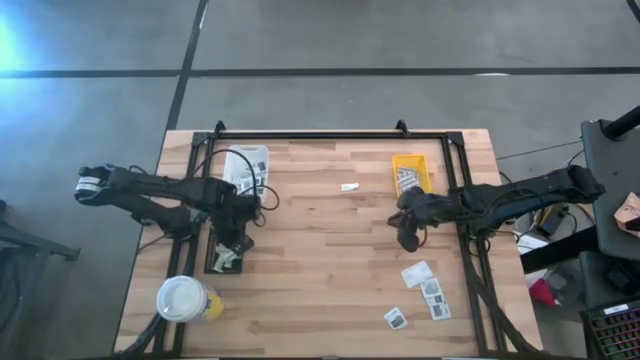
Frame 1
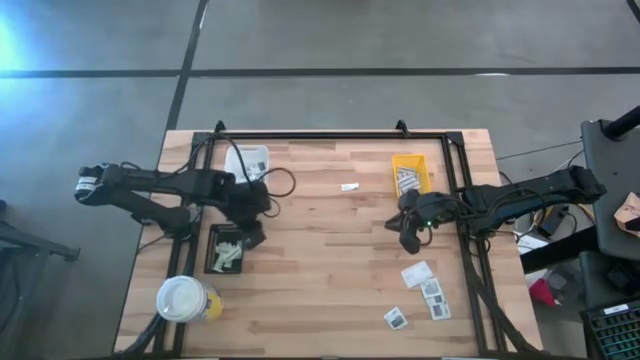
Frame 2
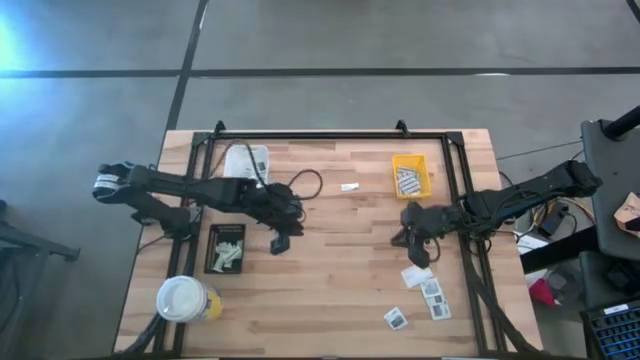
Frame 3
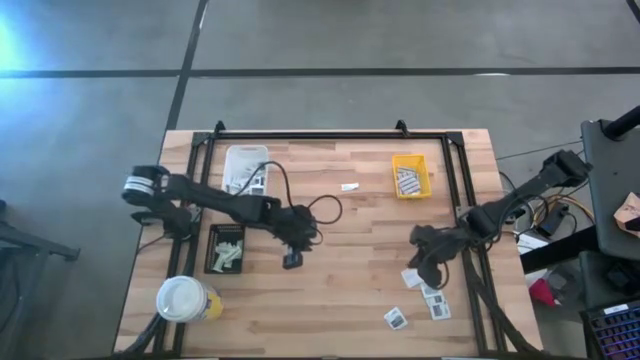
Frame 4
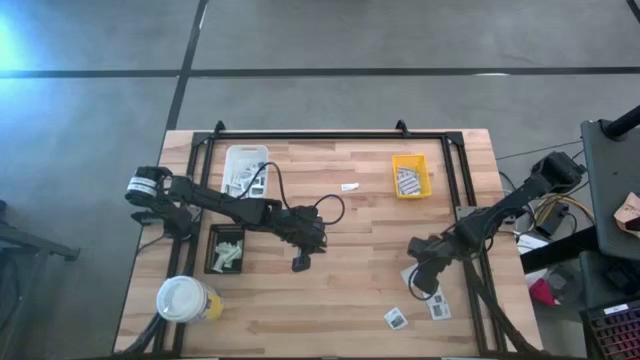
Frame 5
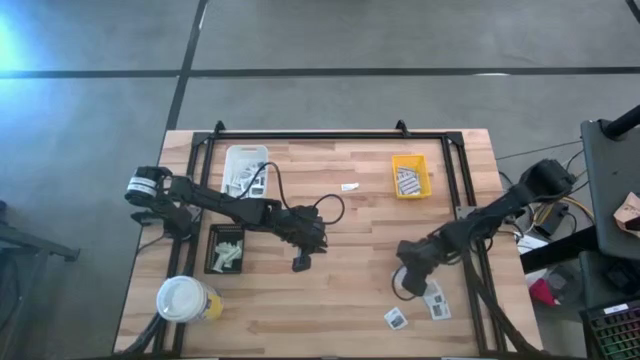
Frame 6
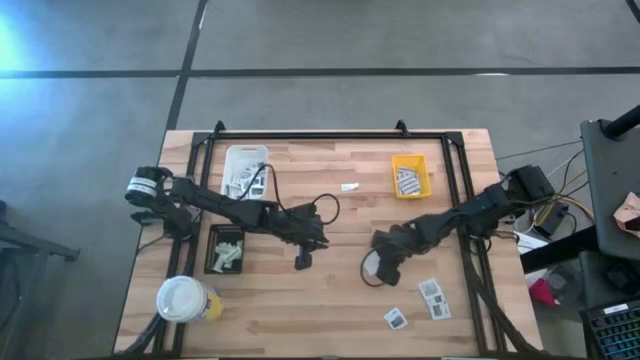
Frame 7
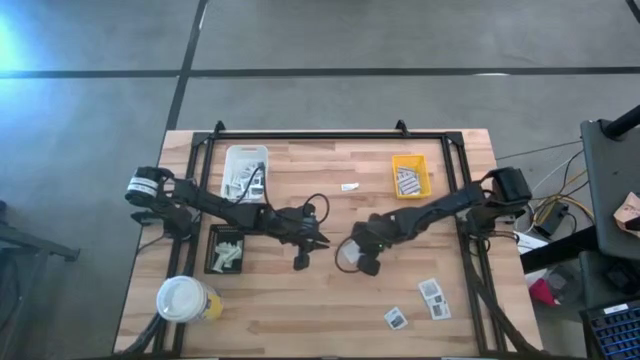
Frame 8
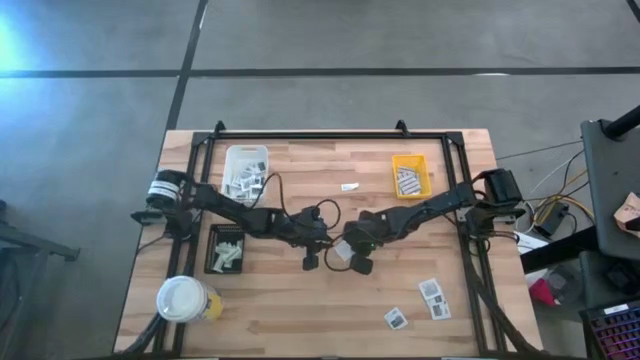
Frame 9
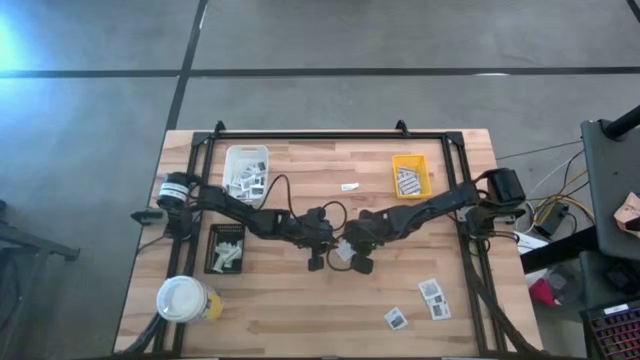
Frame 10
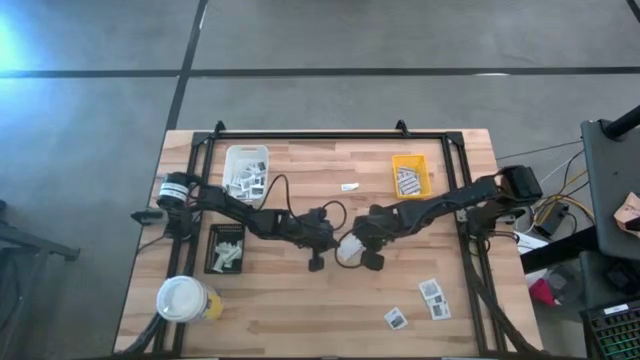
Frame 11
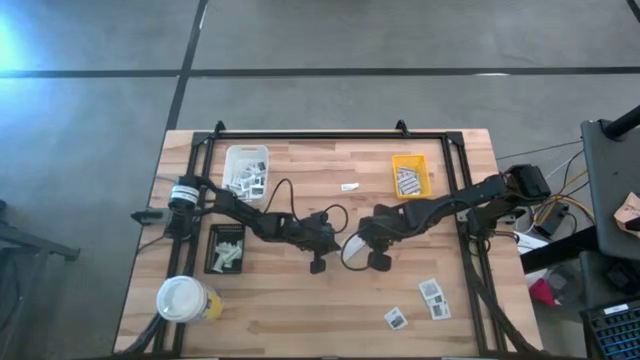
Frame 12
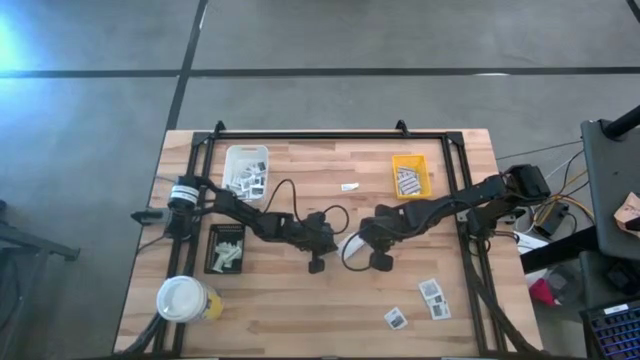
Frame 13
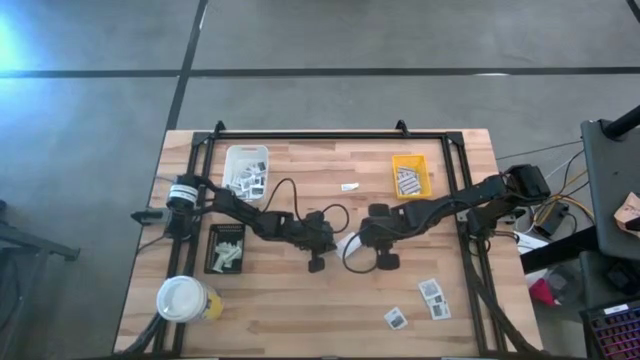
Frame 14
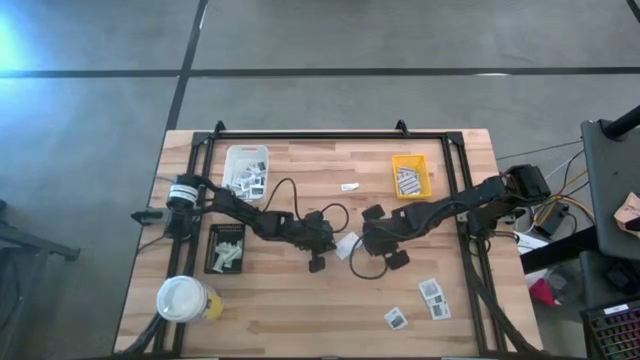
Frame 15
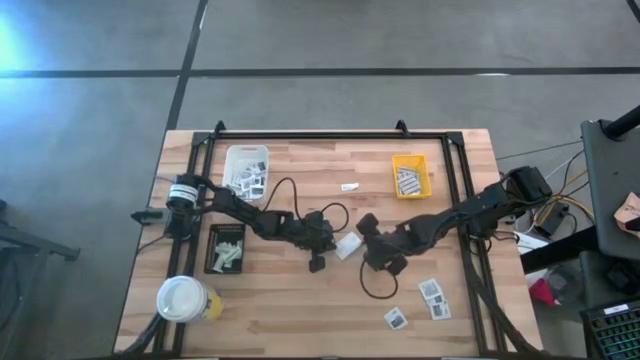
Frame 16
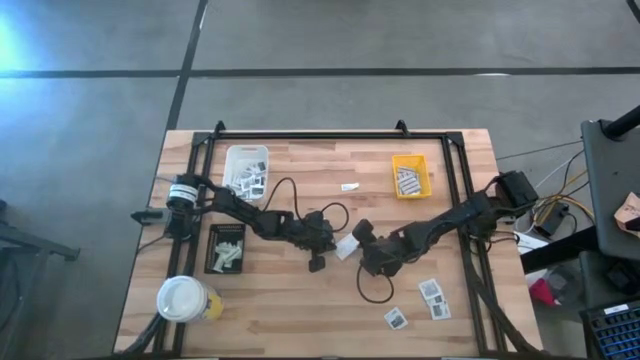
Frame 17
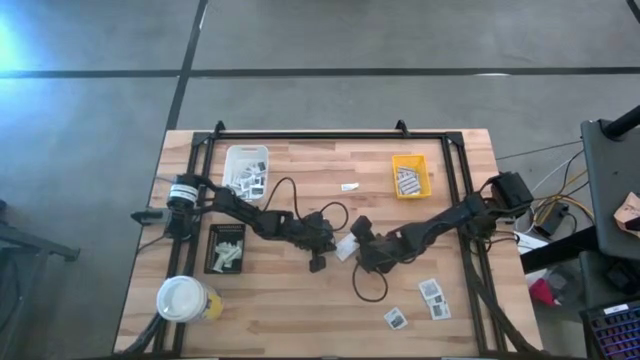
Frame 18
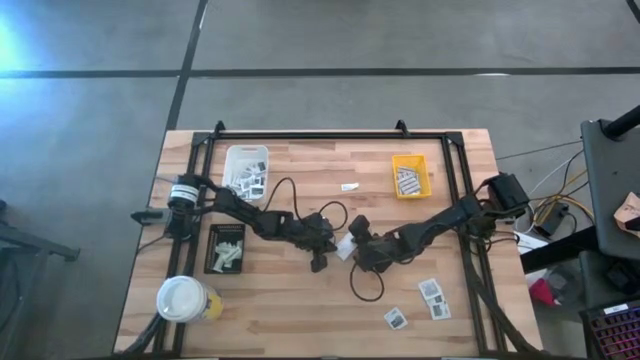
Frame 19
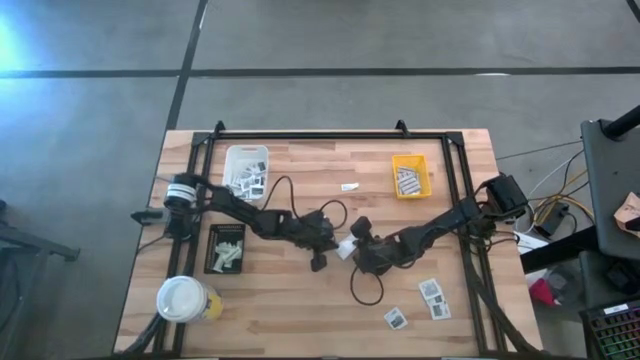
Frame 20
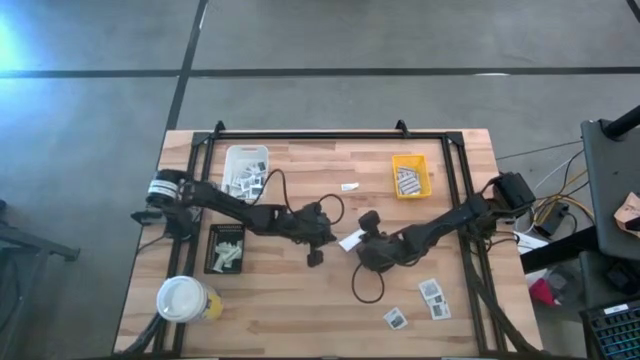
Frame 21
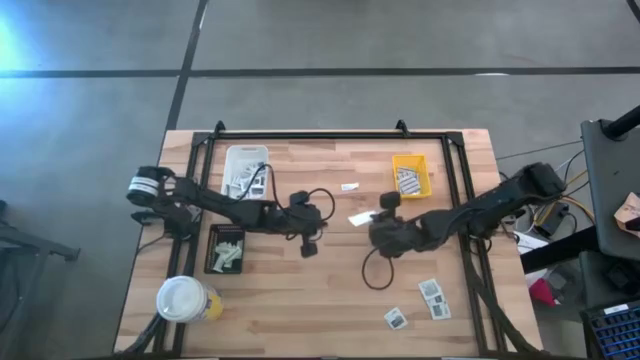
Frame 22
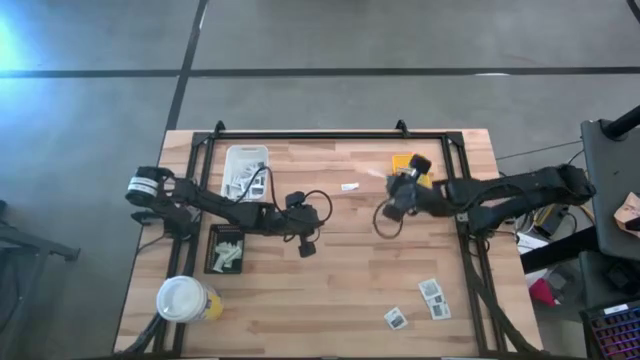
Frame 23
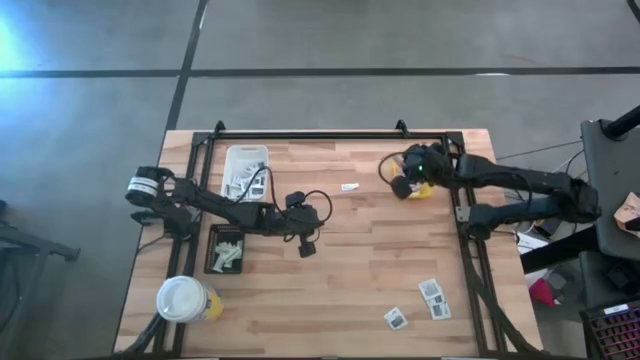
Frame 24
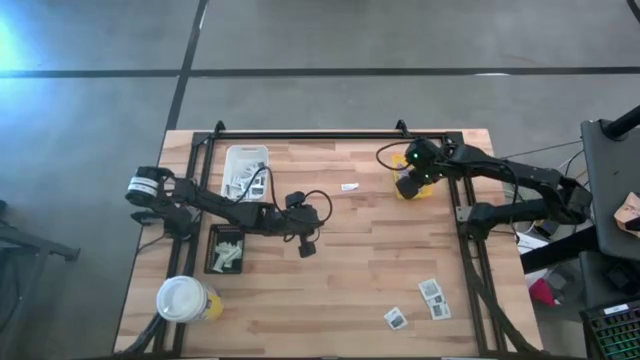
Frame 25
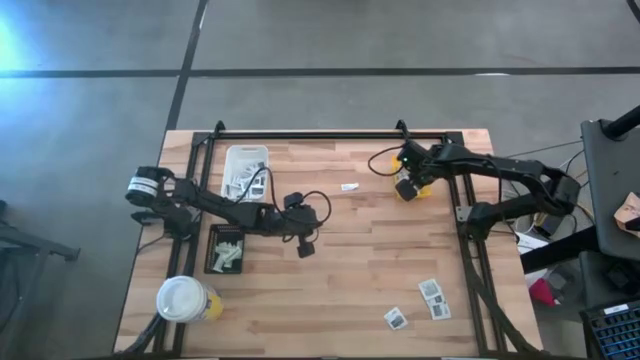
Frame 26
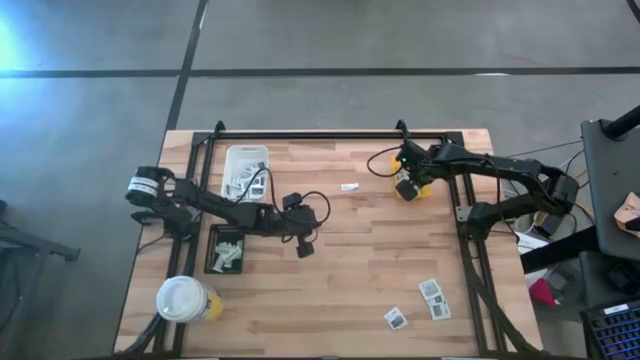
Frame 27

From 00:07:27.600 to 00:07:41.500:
Task: Pick & Place First Aid Supplies
Put the blue bandage pack into the yellow bin

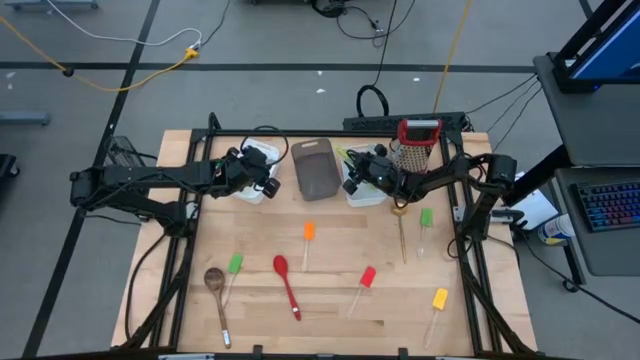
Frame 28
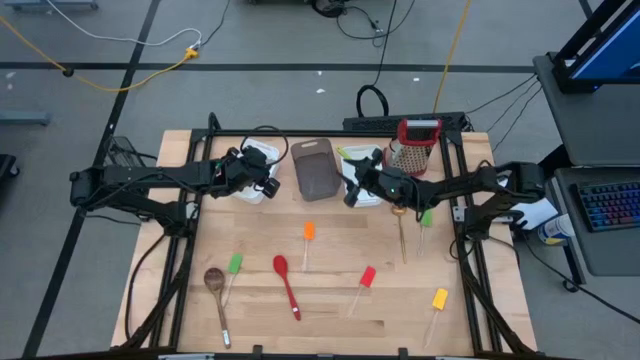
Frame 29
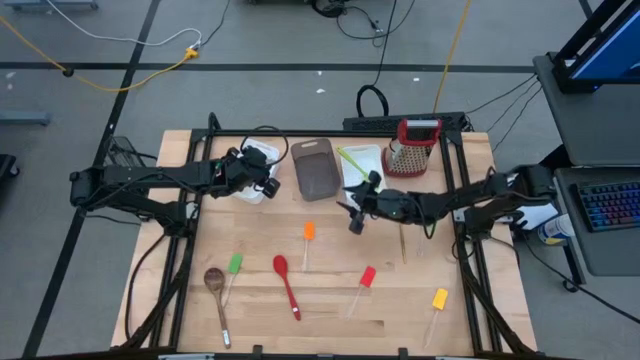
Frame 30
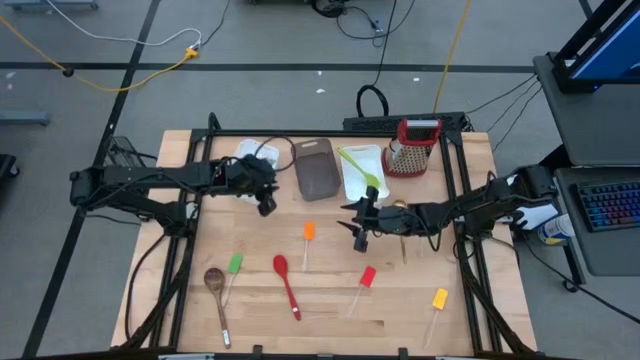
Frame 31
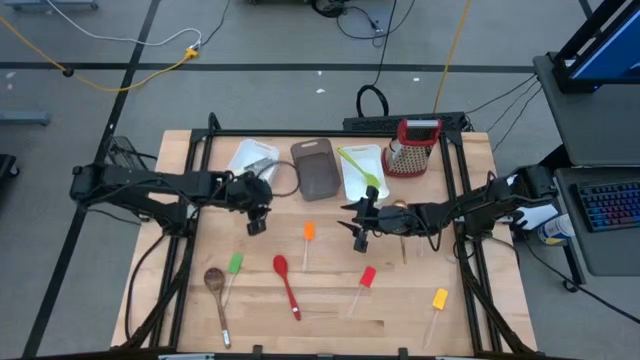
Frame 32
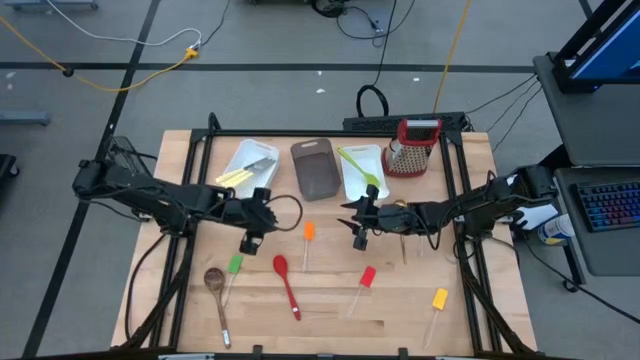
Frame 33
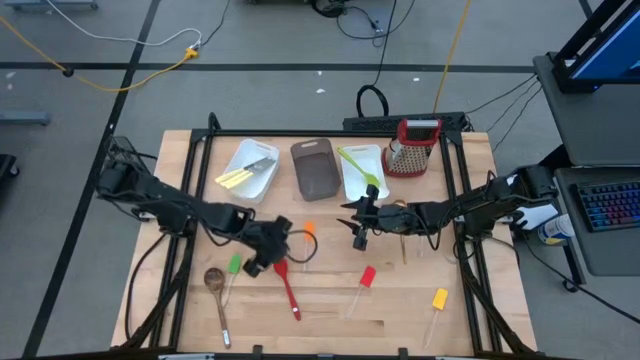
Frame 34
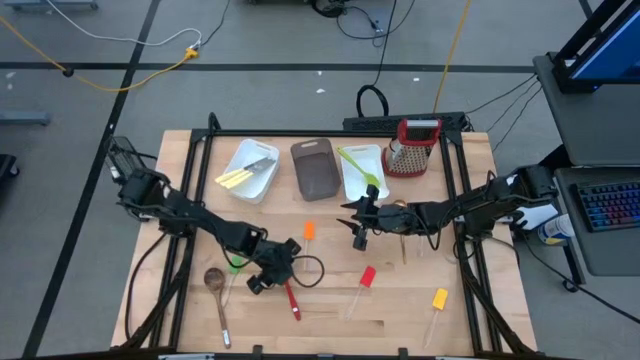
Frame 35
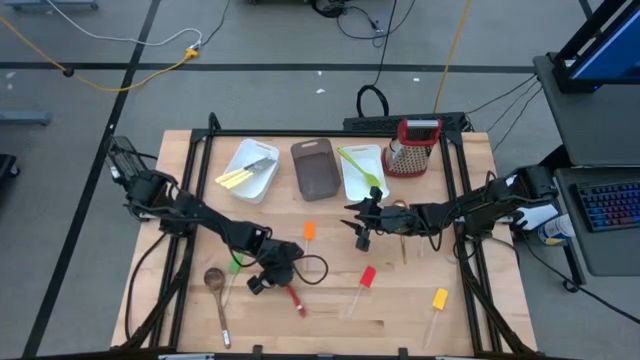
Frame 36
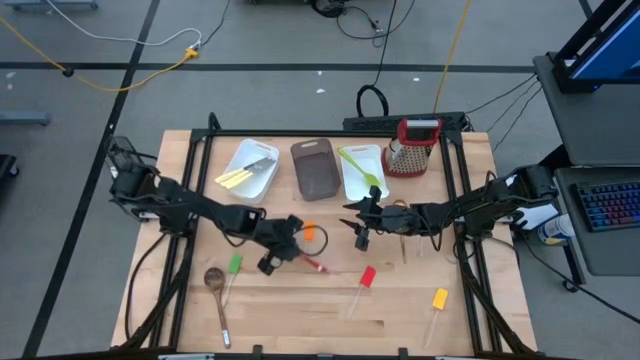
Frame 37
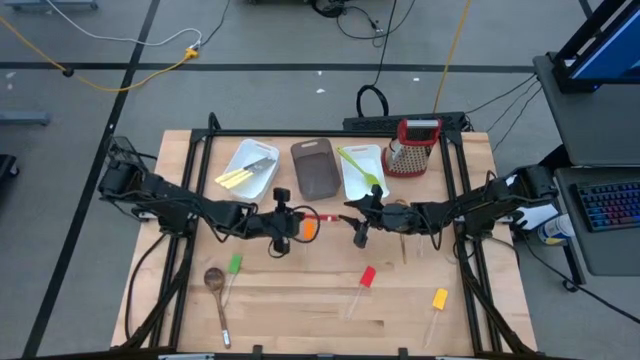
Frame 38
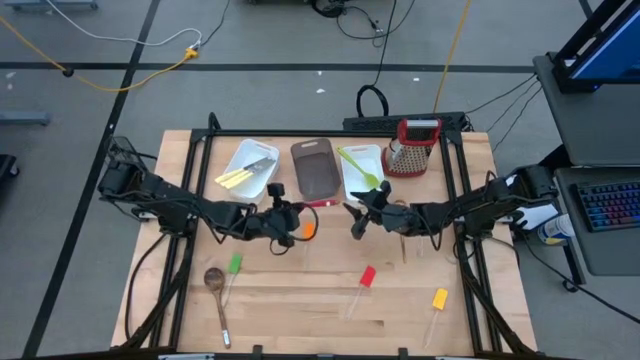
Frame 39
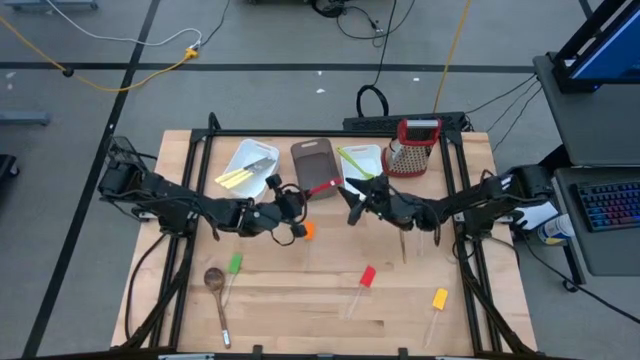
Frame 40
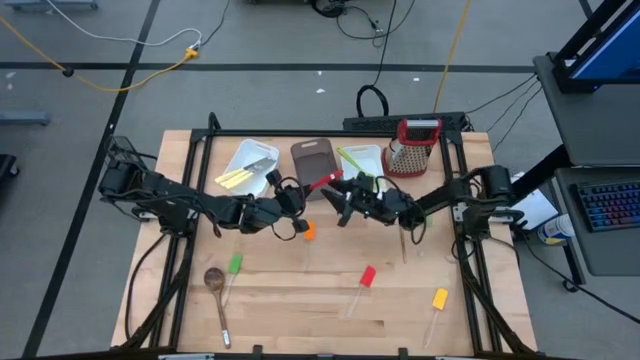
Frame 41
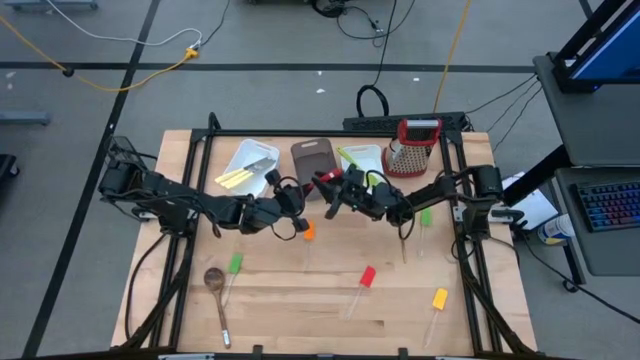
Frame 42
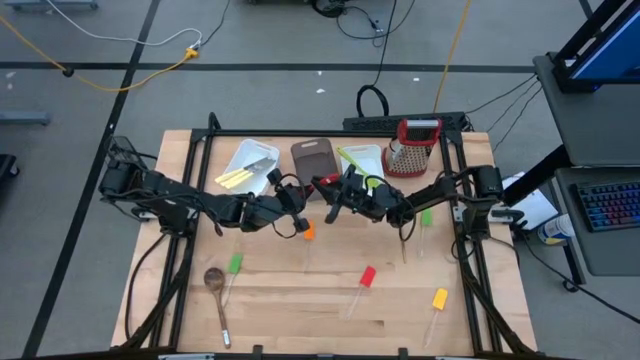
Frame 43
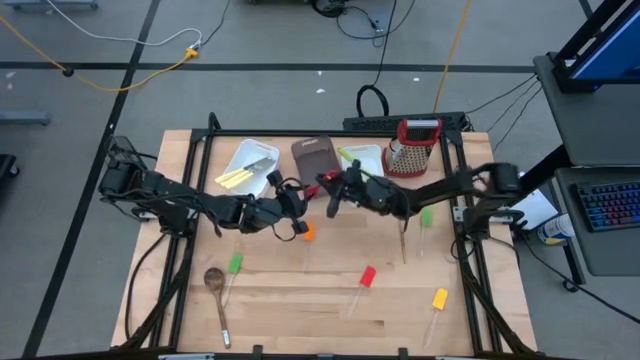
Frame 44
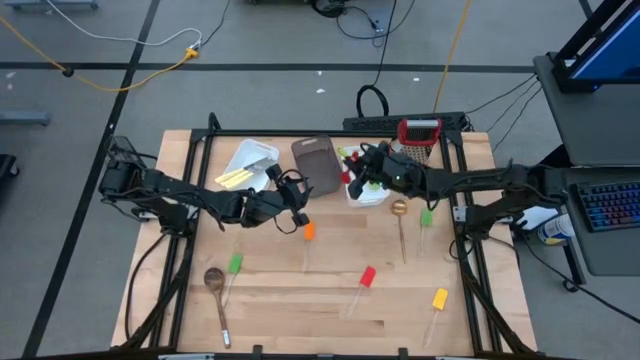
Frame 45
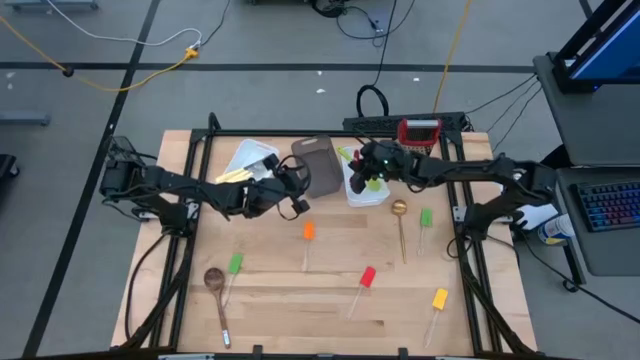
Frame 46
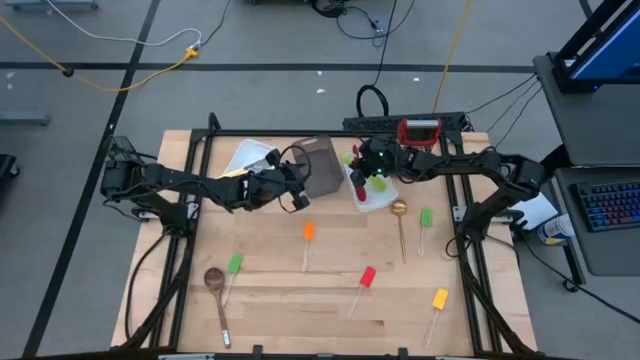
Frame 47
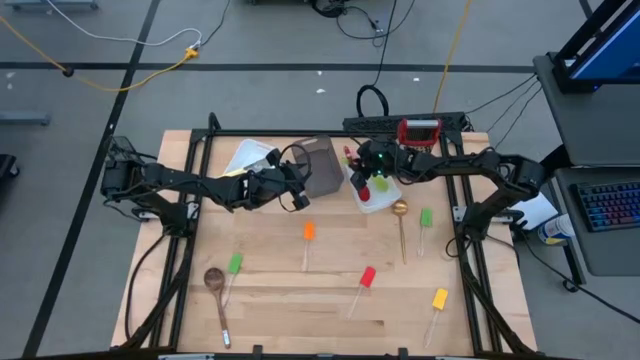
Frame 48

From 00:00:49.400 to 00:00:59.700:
Task: Pick & Place Kitchen Items
Put the red slotted spoon into the right white bin
